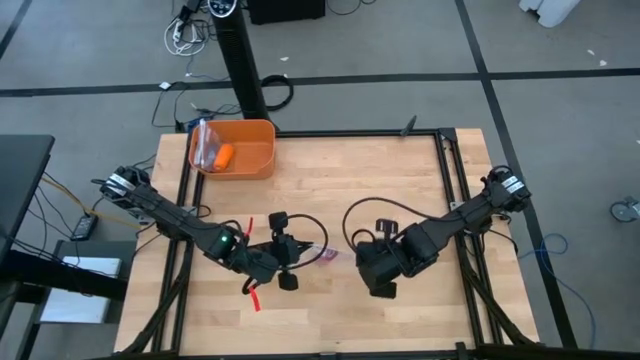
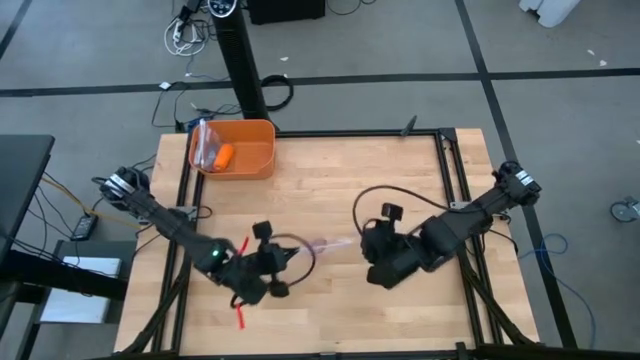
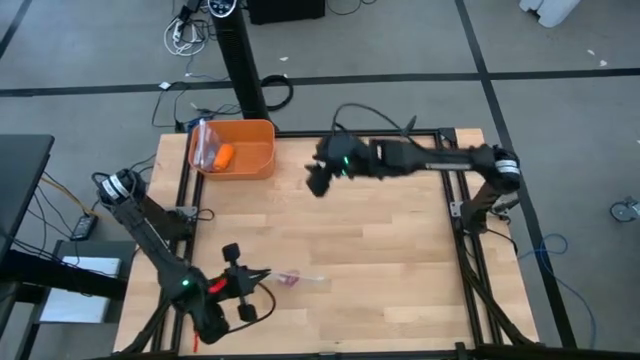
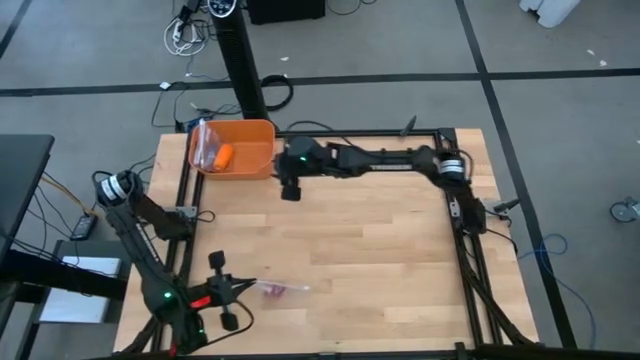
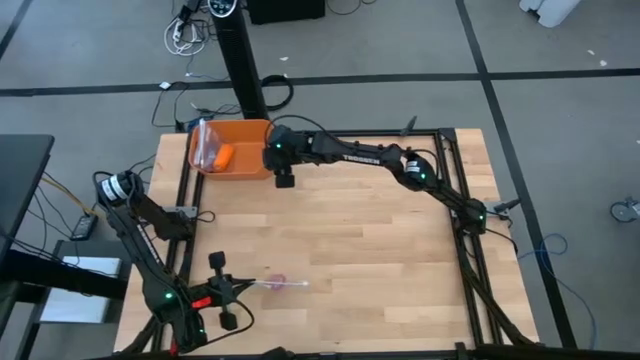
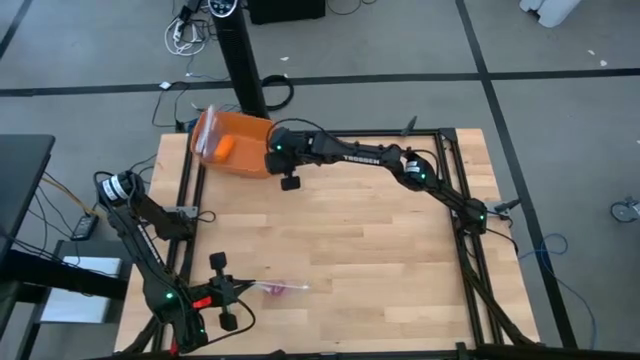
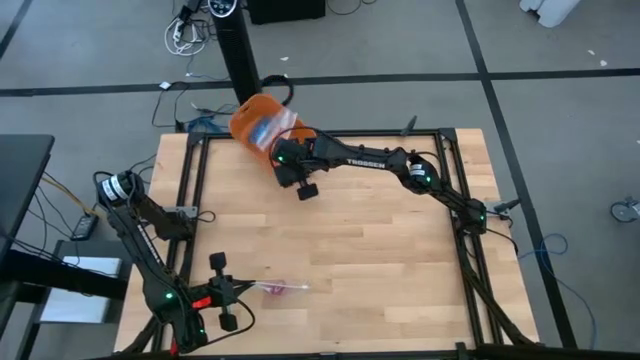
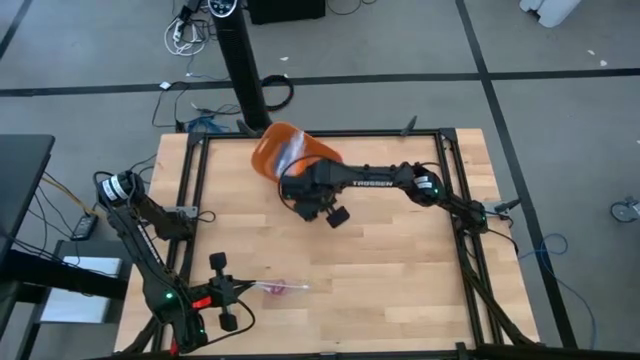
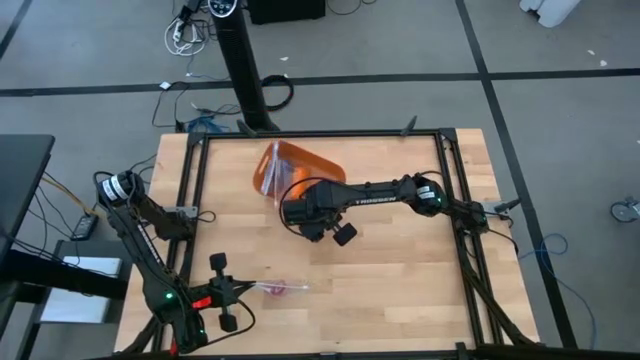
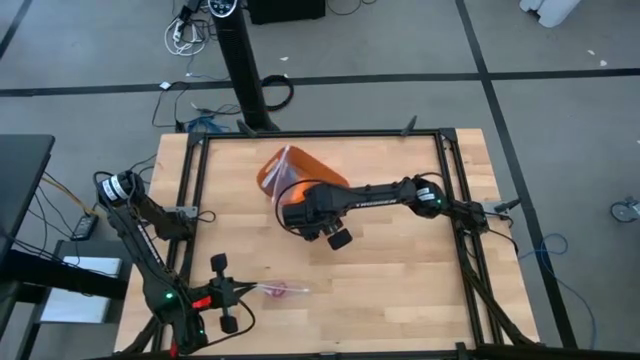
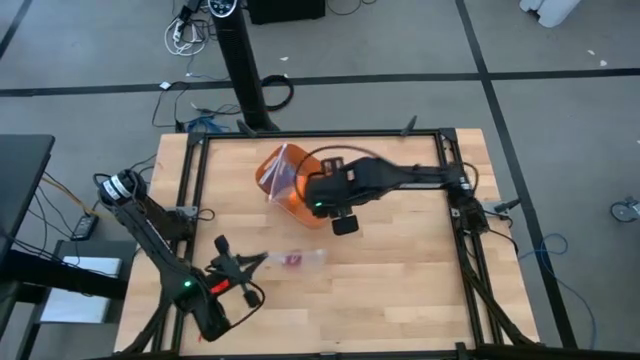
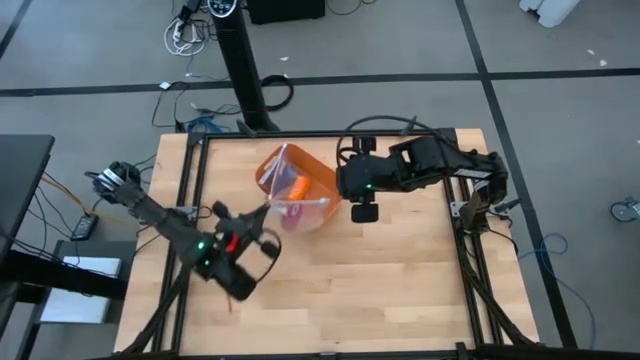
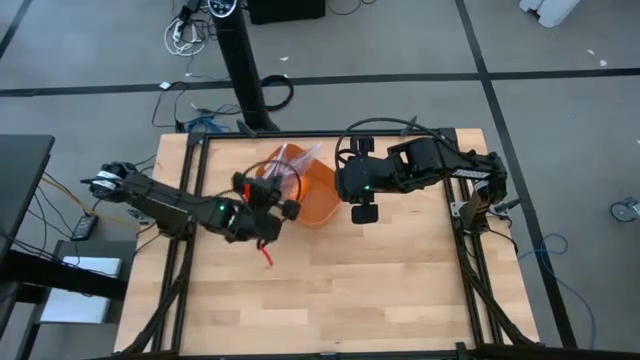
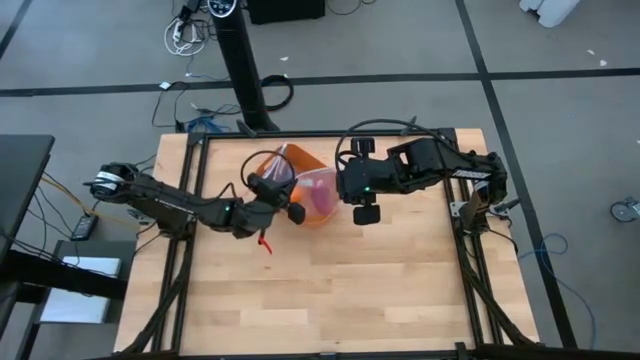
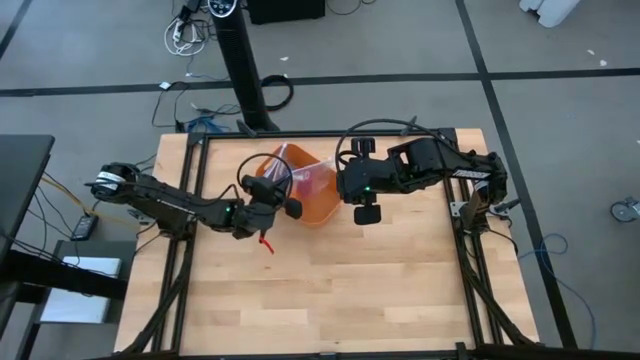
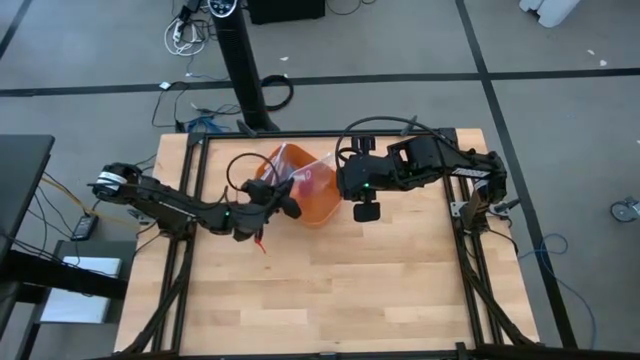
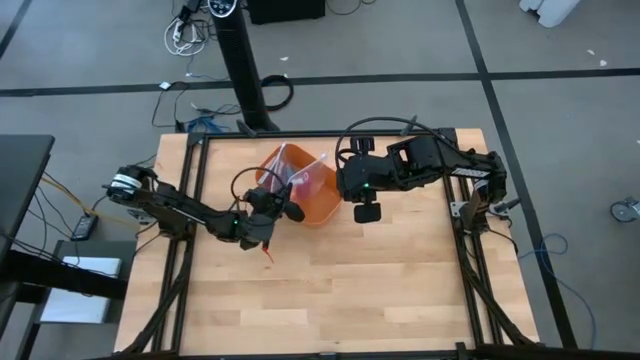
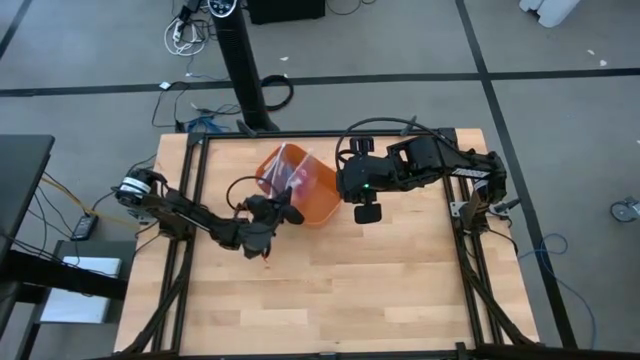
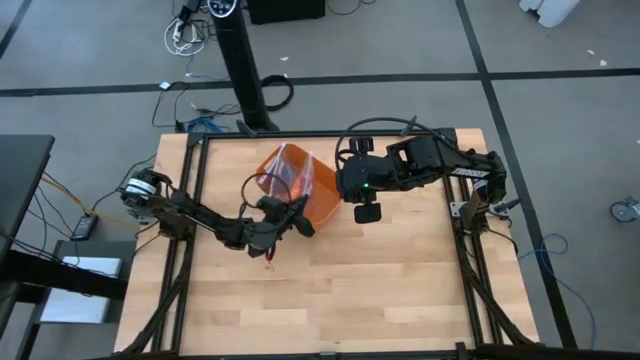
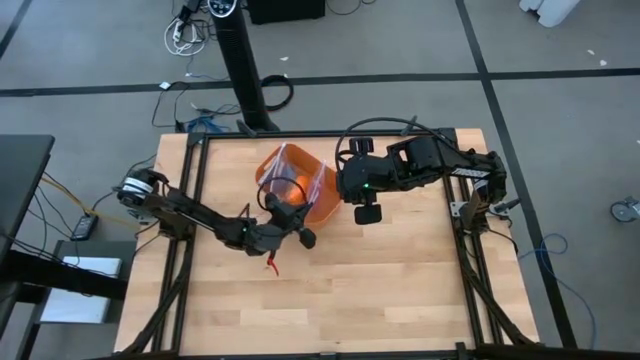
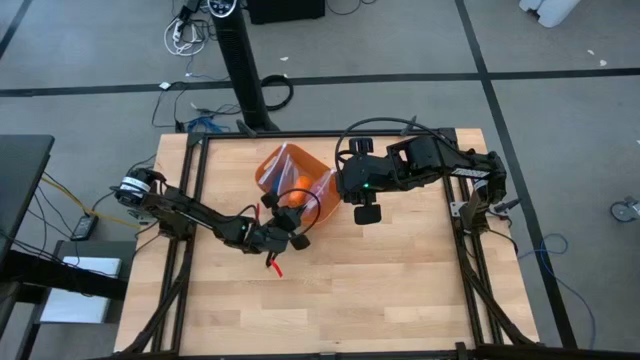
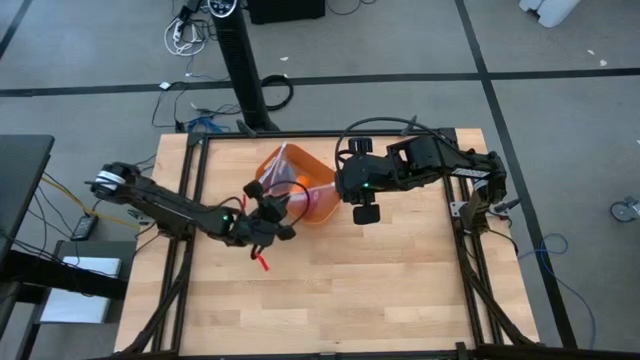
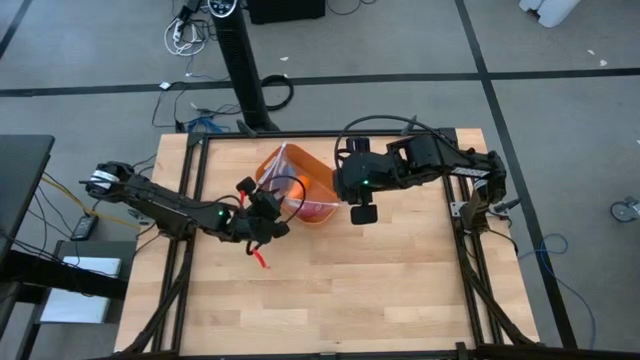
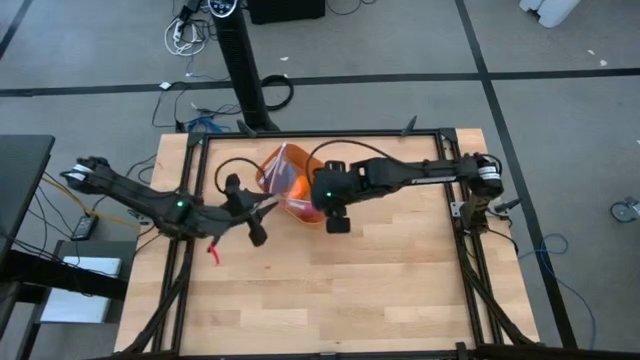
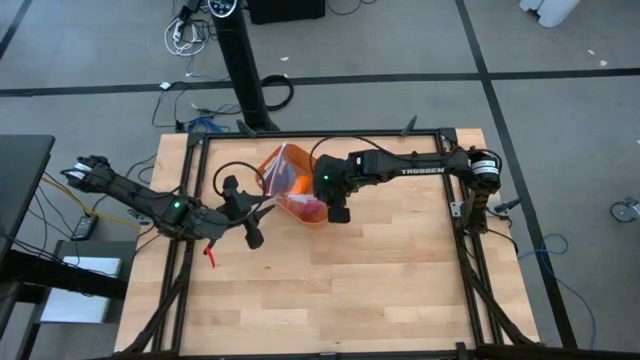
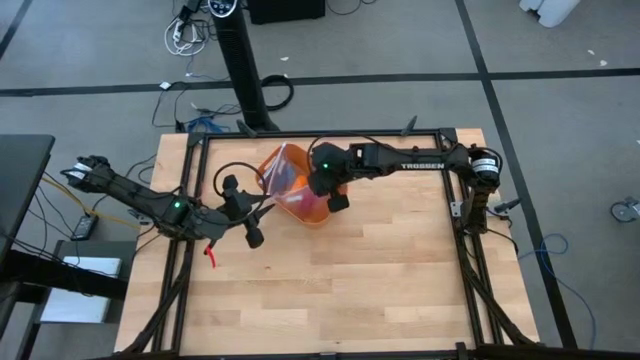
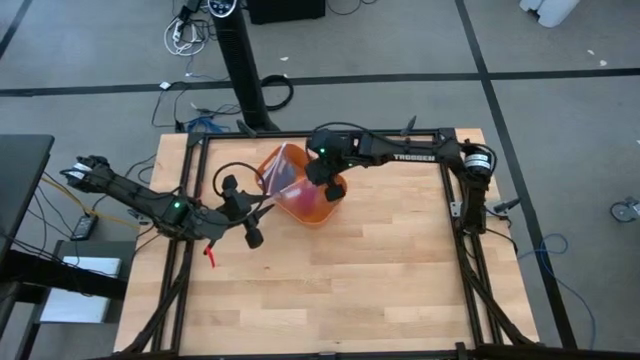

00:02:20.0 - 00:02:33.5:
Task: Roll bandage
Put the transparent zip bag inside the basket

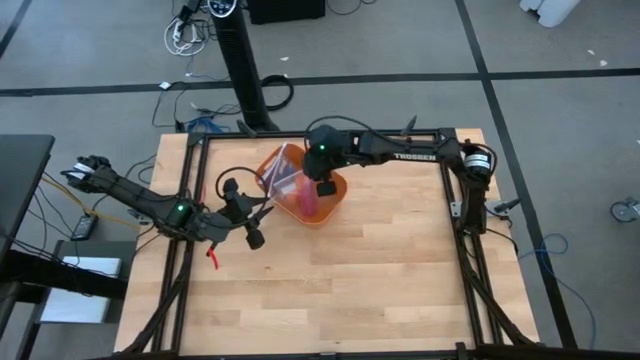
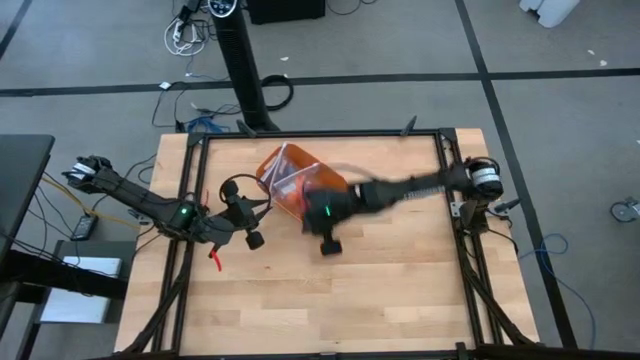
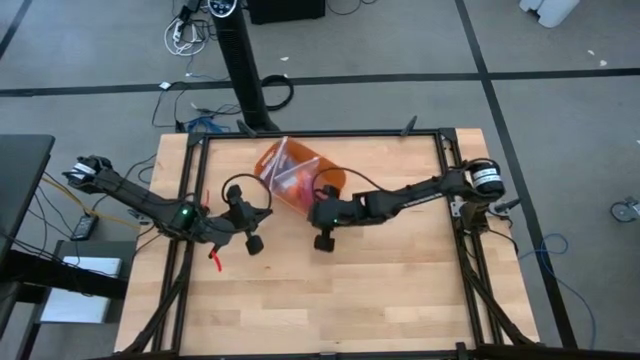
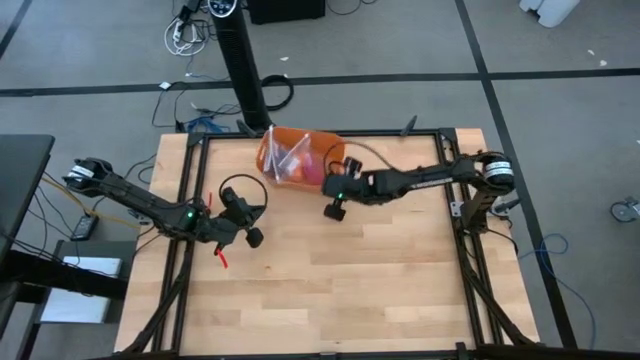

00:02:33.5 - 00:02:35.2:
Move the basket on top of the table

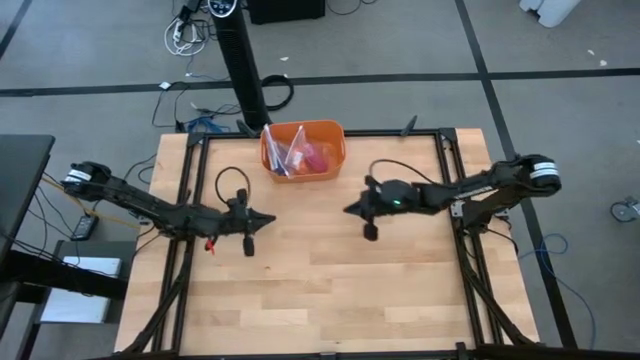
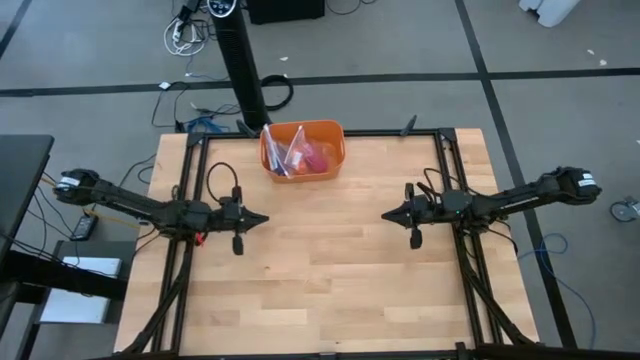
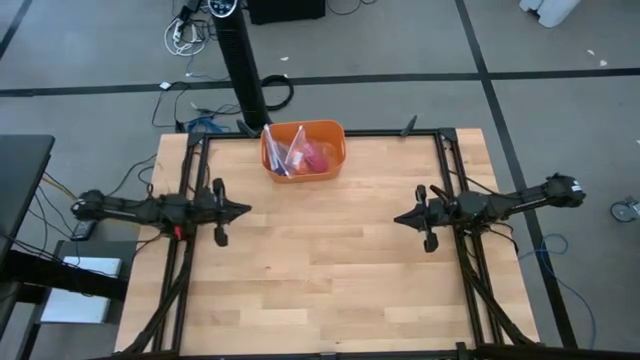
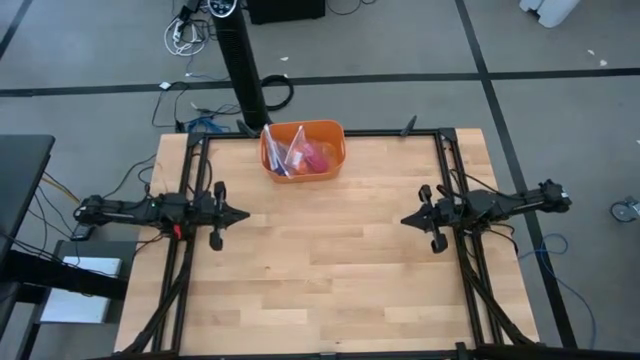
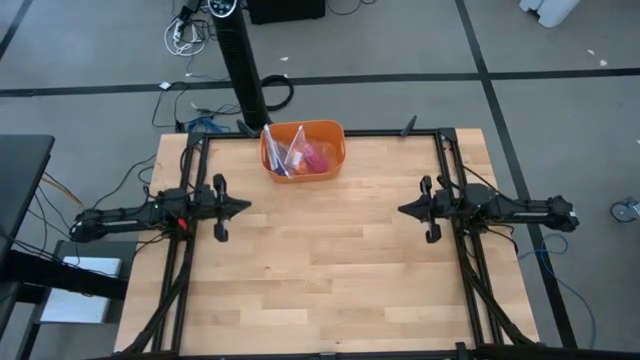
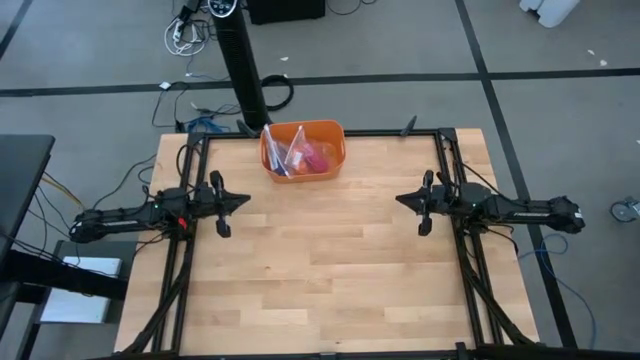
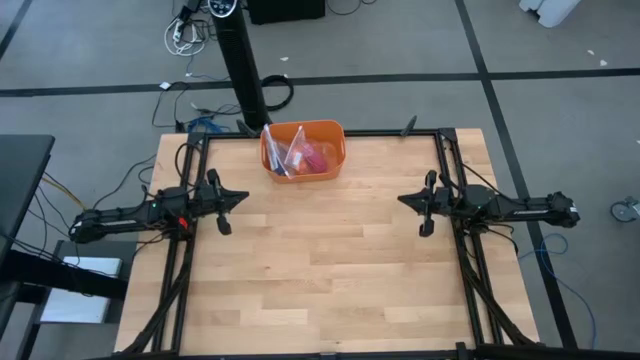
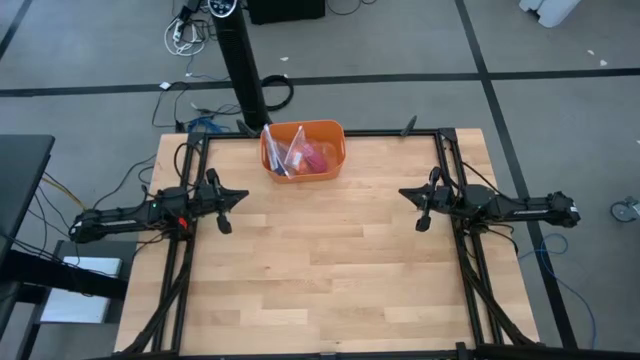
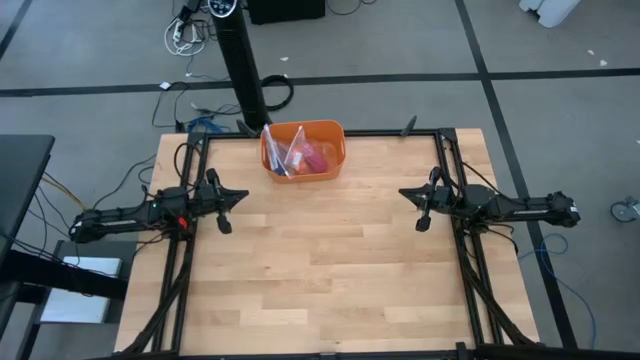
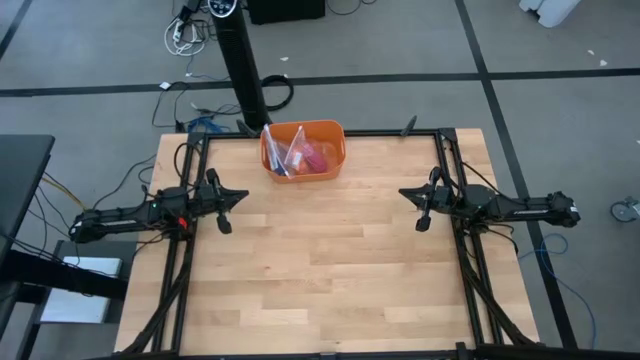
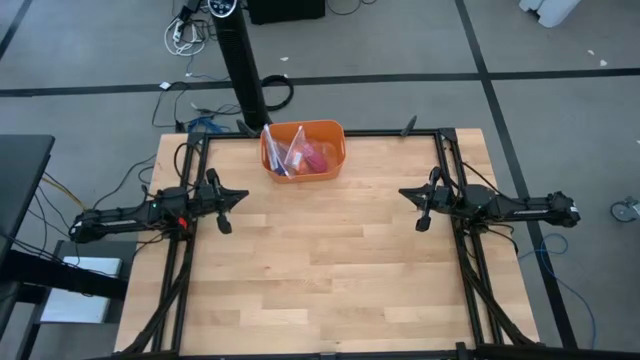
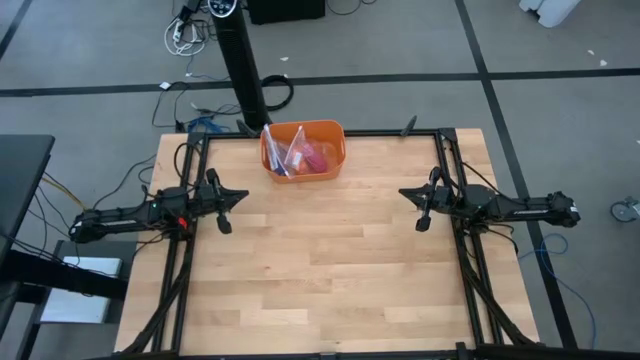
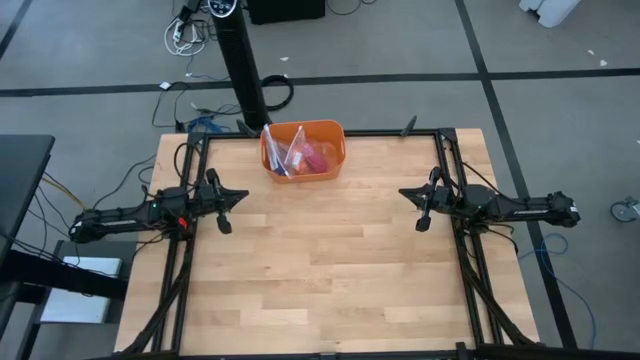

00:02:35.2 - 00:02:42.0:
Return to home position
